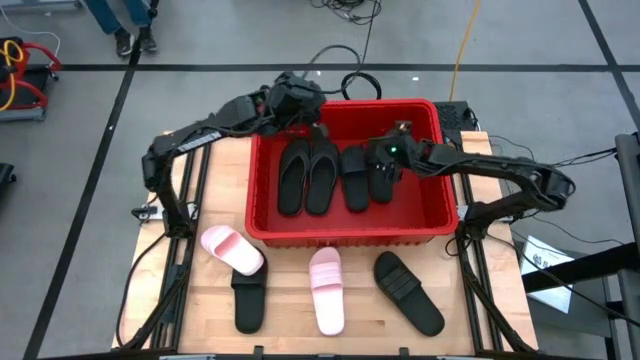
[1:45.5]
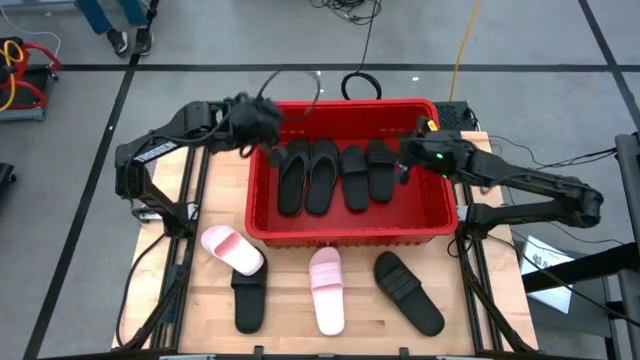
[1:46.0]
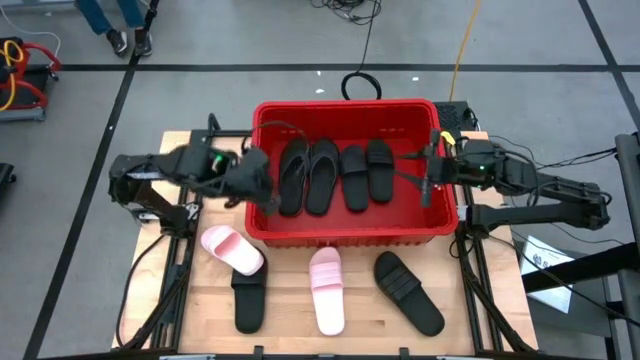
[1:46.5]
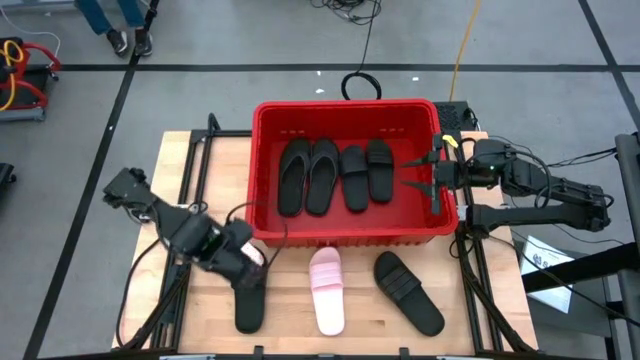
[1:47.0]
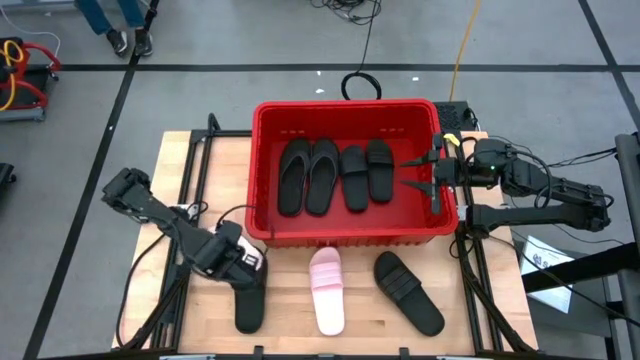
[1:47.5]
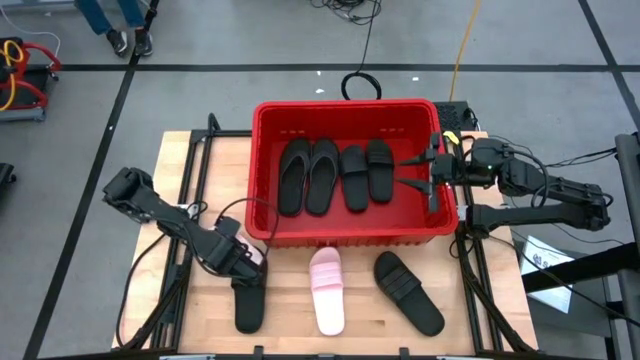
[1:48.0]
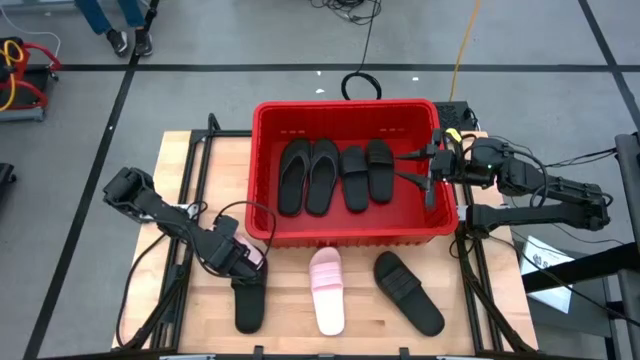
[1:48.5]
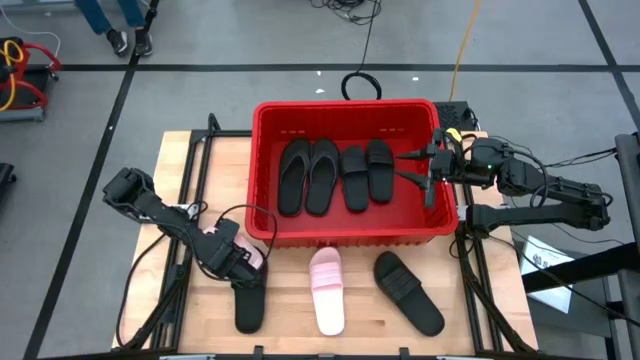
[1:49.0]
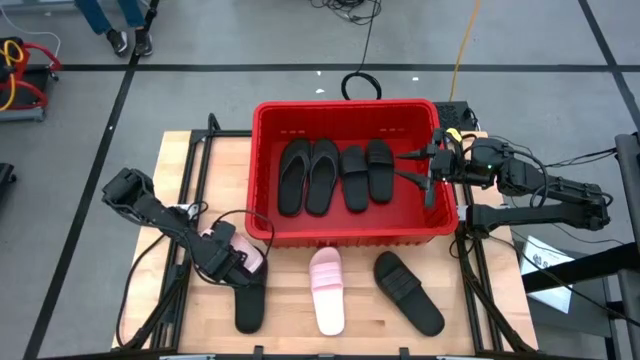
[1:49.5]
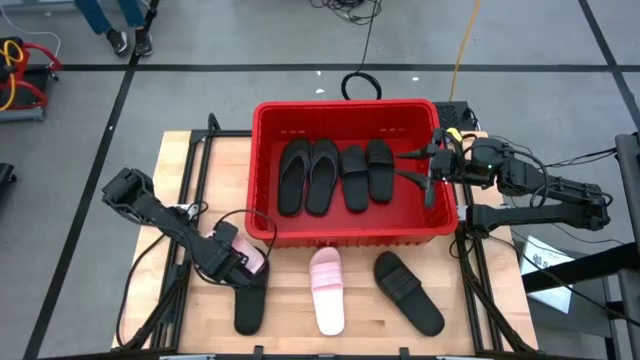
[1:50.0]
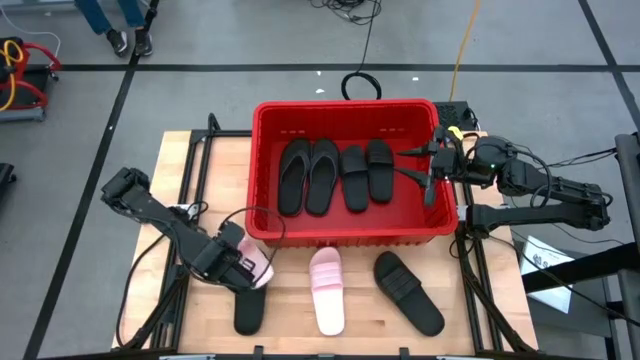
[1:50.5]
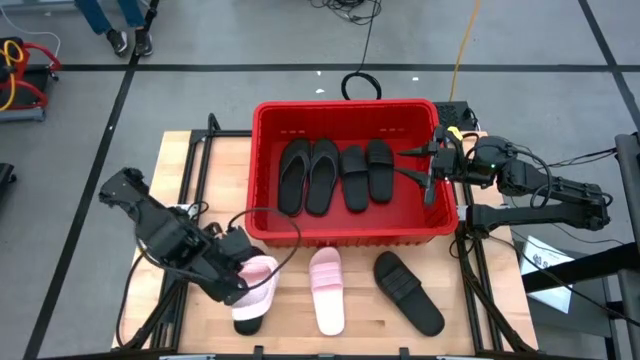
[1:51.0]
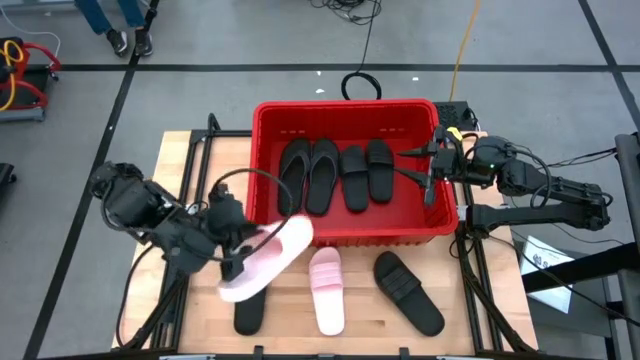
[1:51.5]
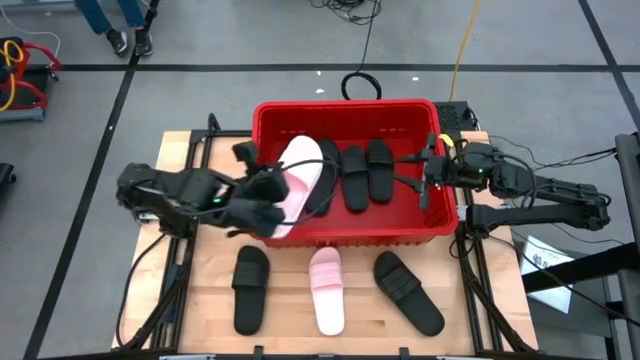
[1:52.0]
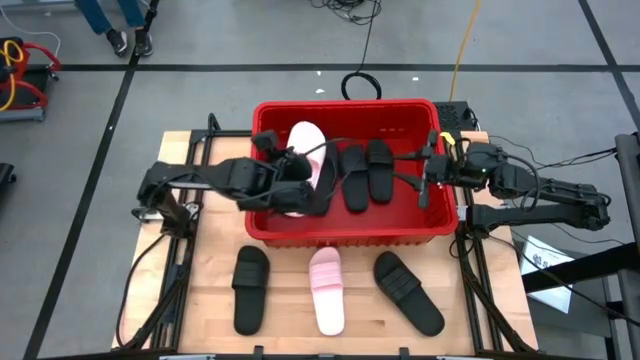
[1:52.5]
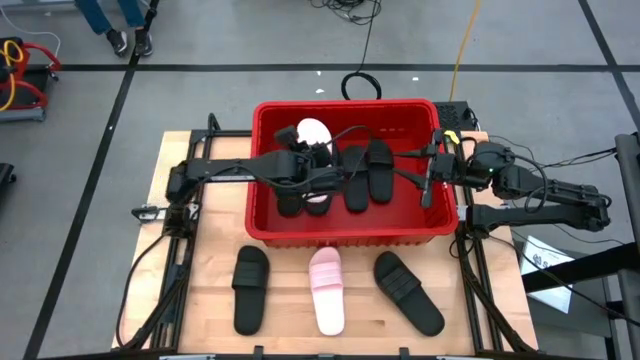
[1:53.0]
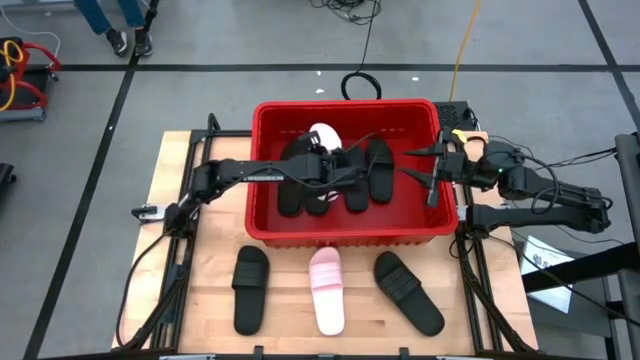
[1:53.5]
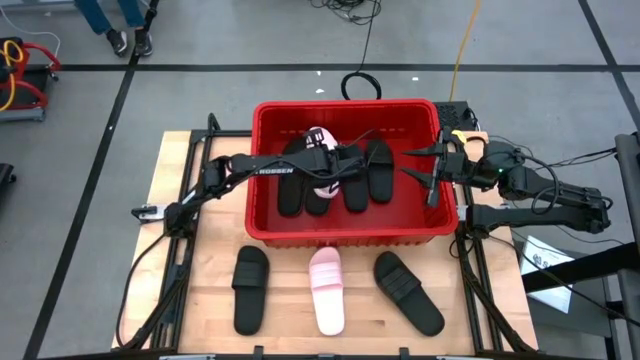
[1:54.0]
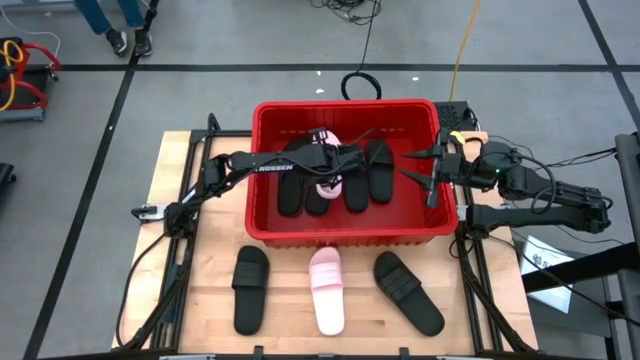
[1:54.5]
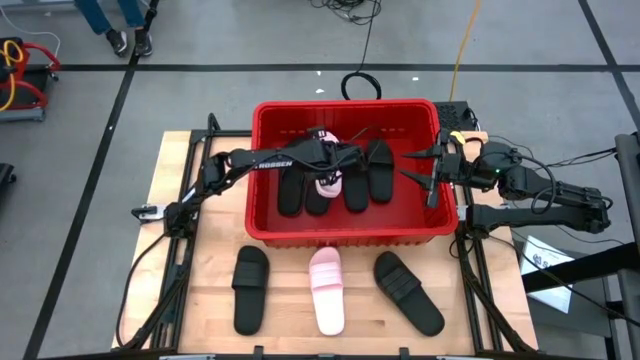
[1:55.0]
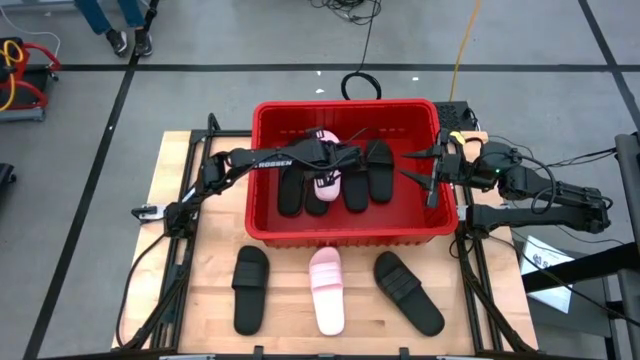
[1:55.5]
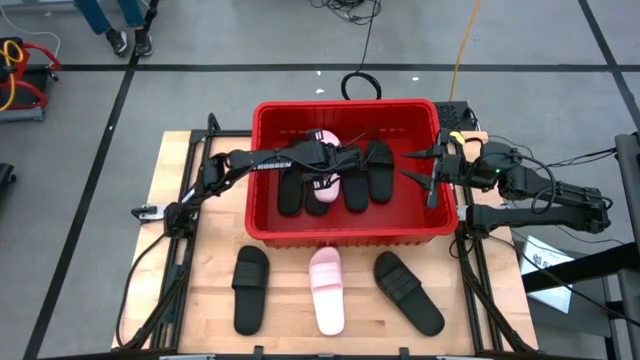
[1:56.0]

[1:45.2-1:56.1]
Task: Pick and place slides into bin
Put the left pink slide into the red bin

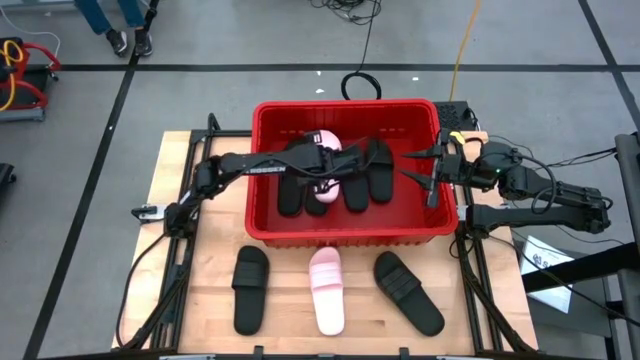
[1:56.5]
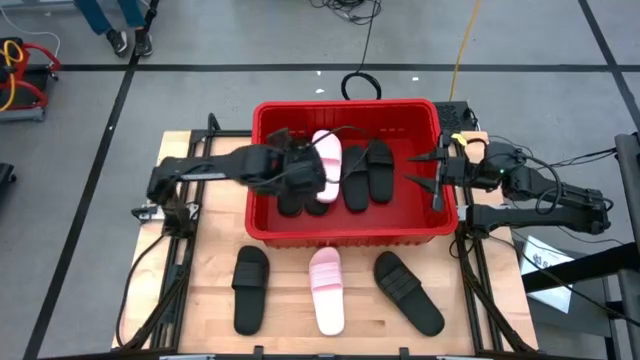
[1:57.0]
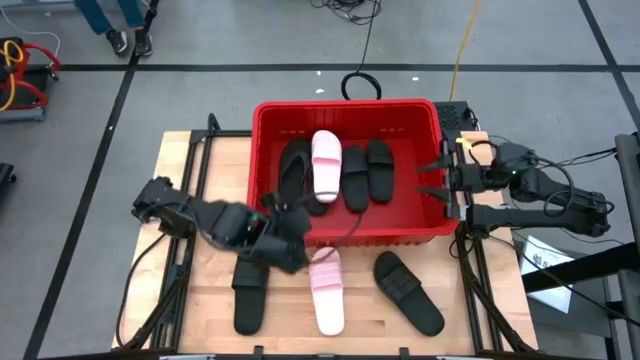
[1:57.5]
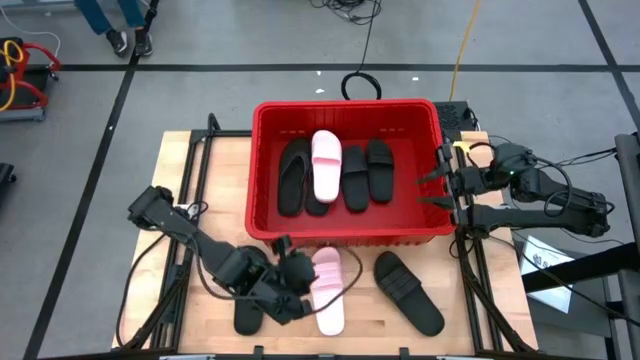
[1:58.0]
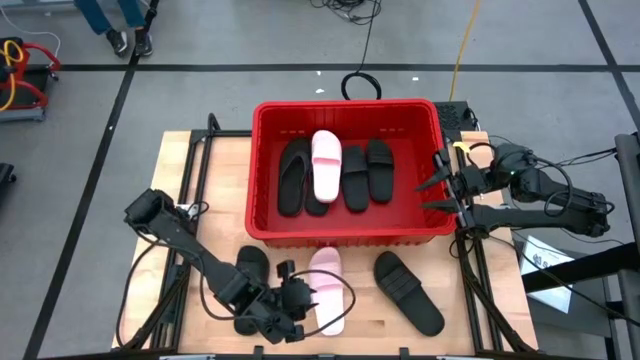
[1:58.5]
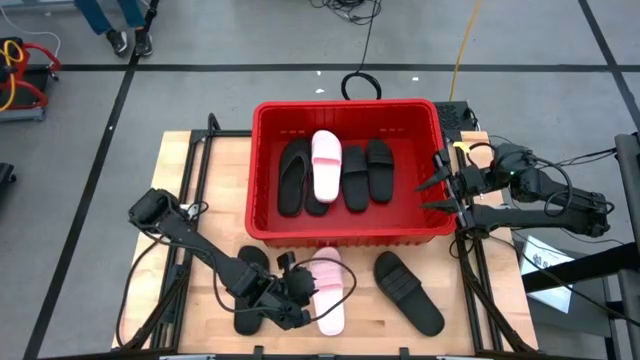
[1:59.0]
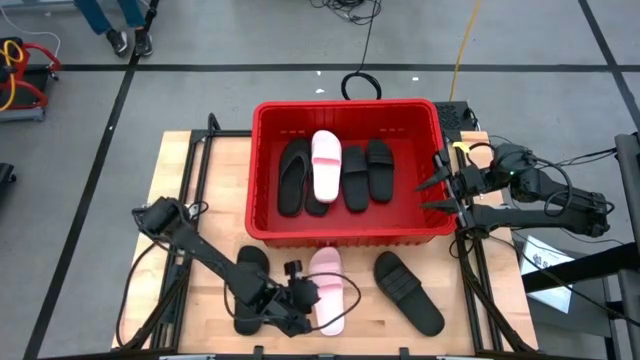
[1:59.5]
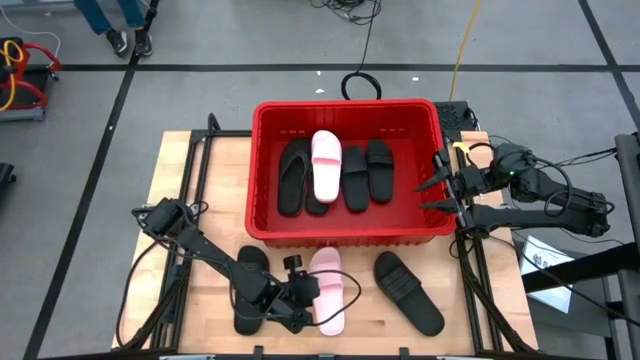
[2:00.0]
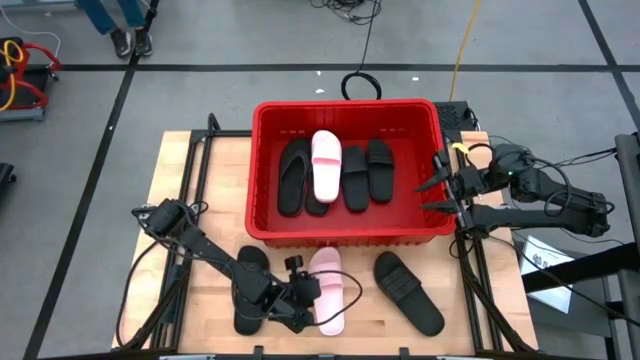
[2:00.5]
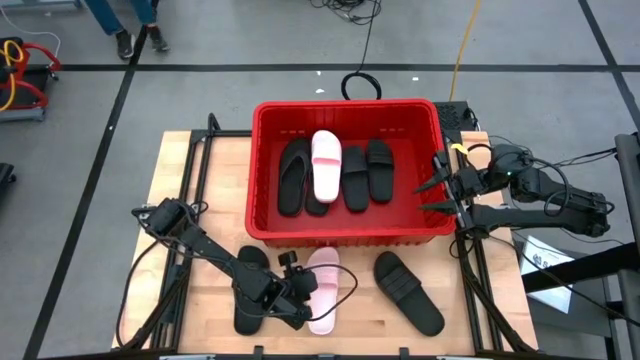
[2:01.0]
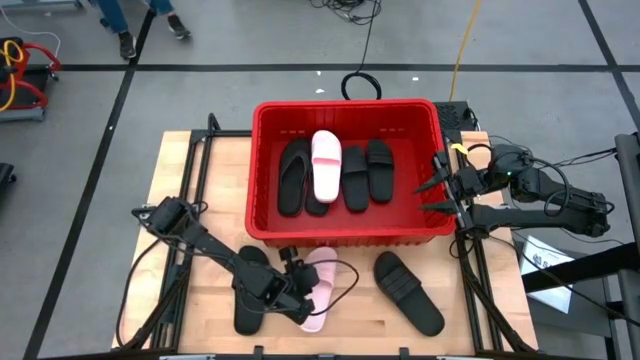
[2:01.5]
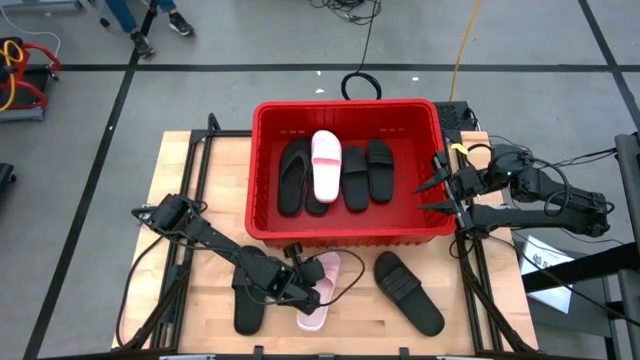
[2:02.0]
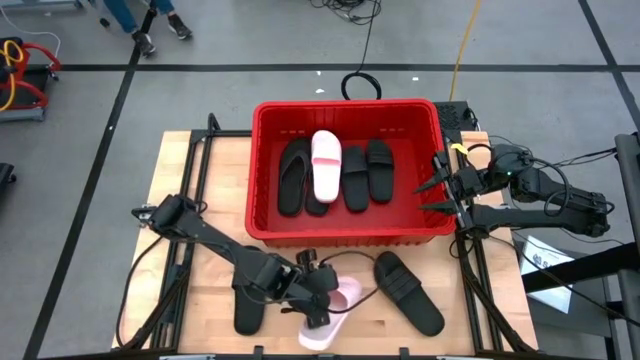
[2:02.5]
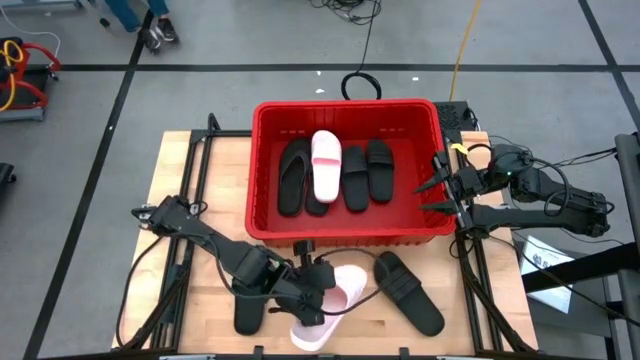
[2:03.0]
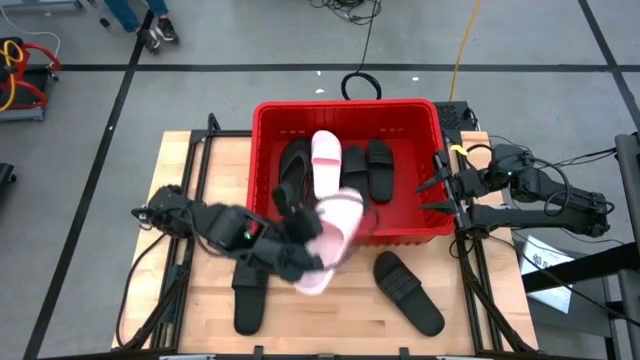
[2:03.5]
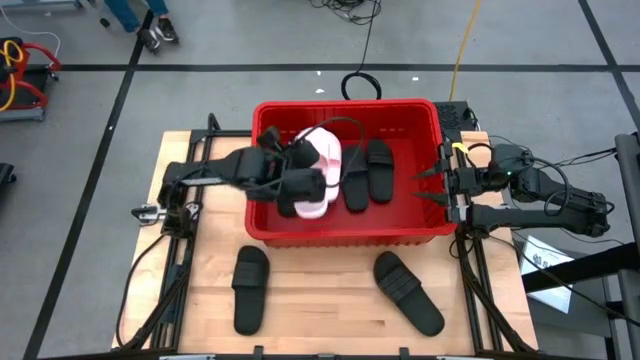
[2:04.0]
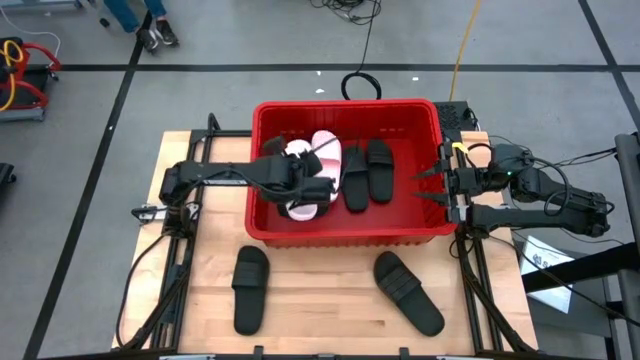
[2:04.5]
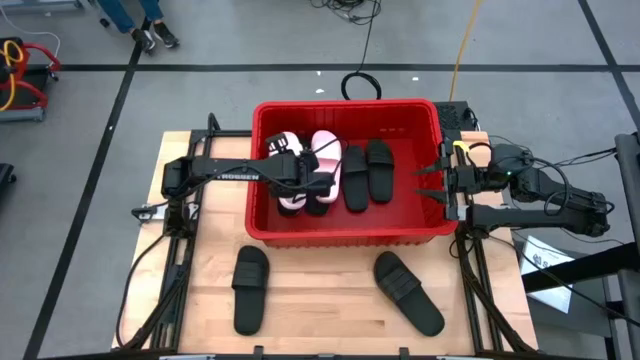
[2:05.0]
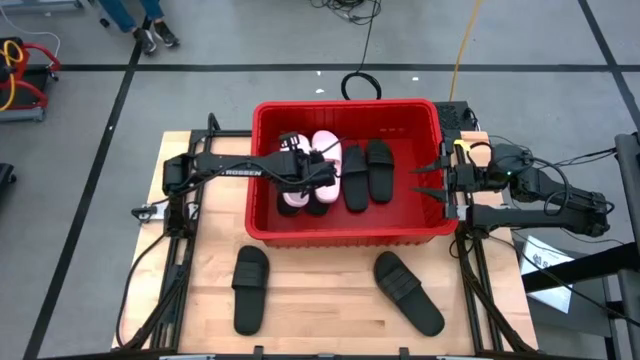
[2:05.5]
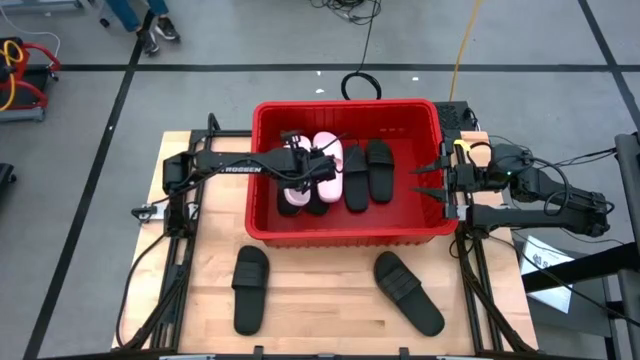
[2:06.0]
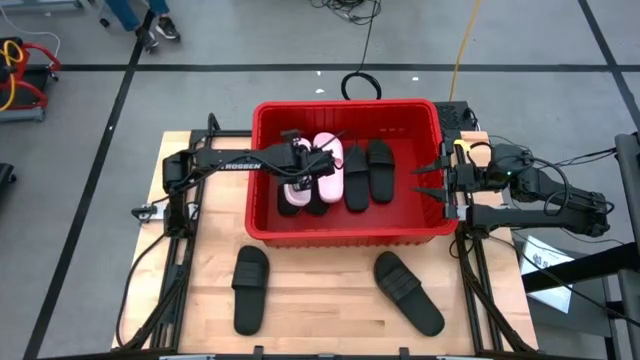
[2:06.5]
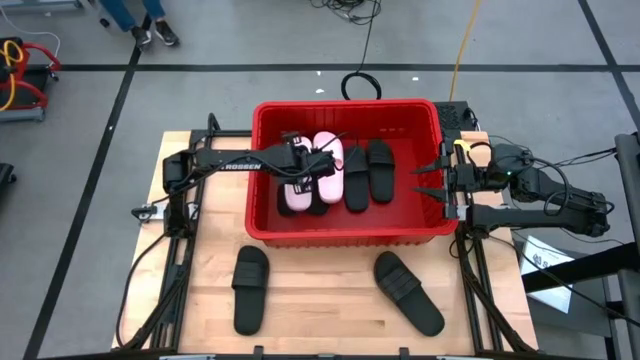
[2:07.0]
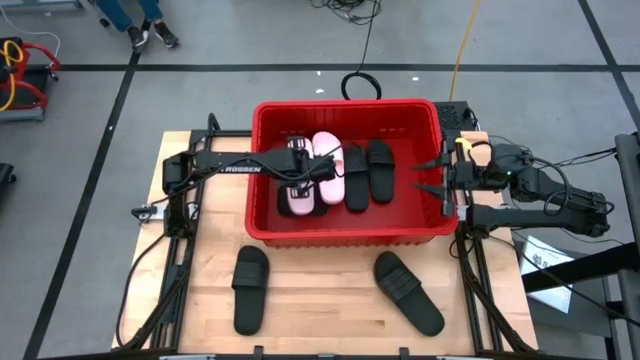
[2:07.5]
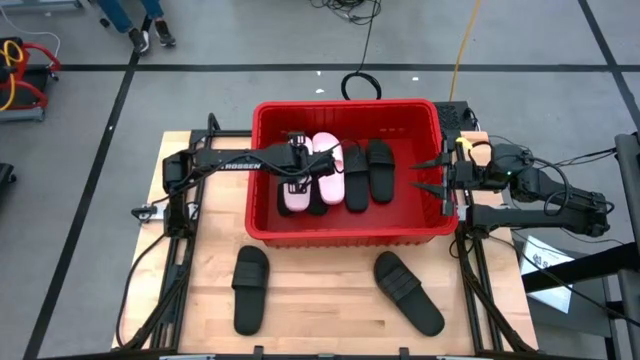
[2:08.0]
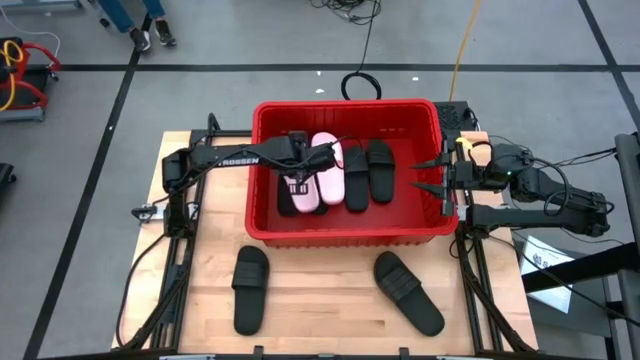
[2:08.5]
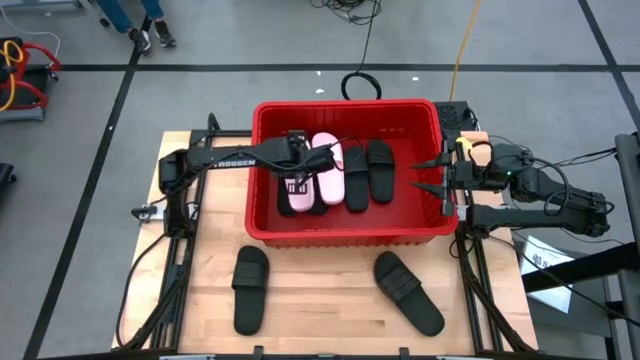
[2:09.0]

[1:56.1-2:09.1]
Put the pink left slide into the red bin
